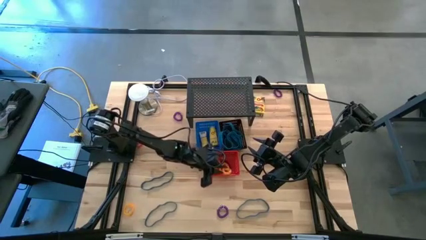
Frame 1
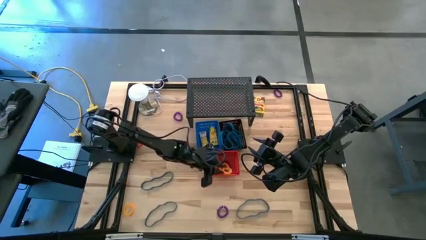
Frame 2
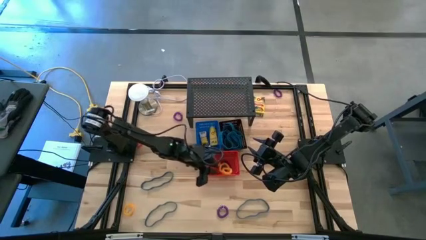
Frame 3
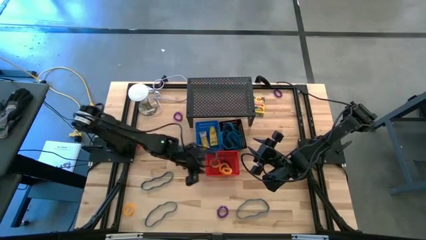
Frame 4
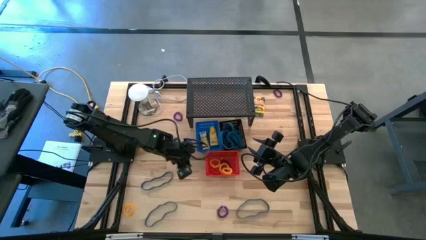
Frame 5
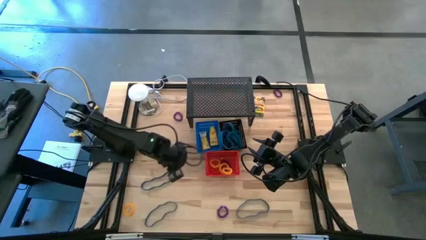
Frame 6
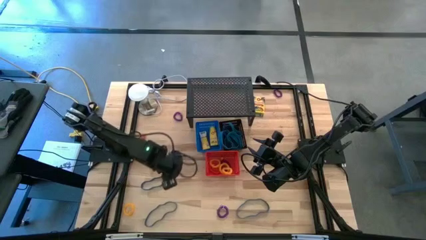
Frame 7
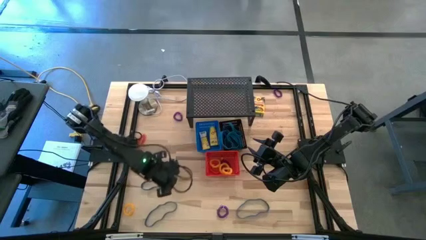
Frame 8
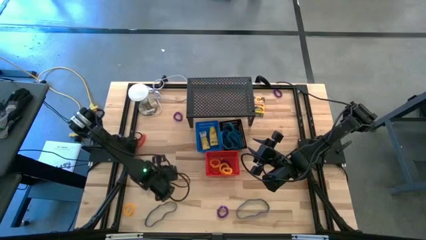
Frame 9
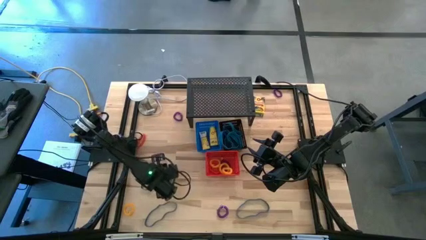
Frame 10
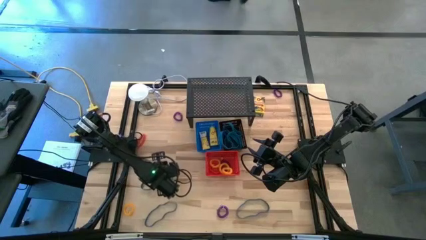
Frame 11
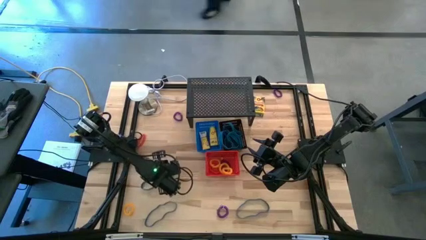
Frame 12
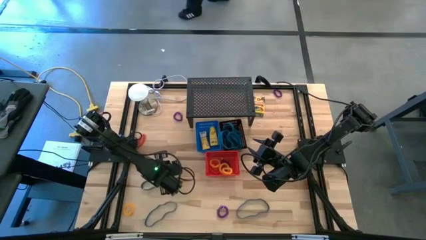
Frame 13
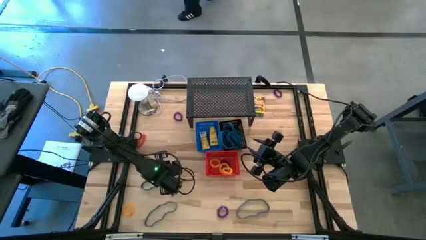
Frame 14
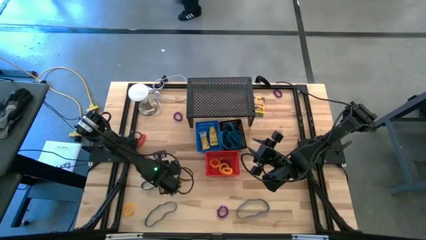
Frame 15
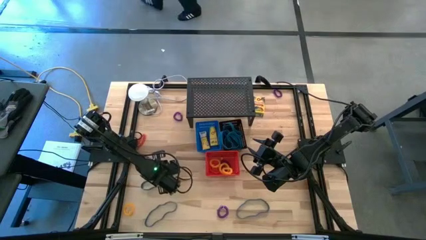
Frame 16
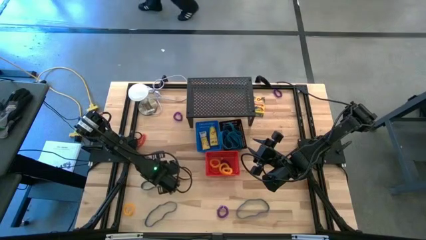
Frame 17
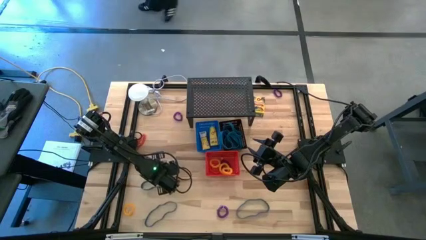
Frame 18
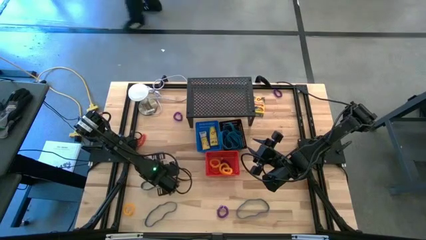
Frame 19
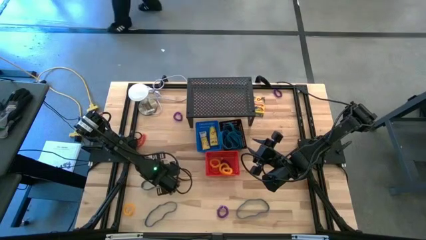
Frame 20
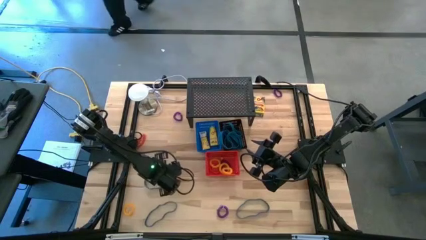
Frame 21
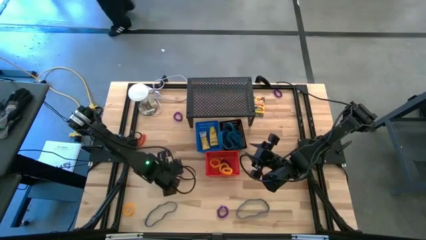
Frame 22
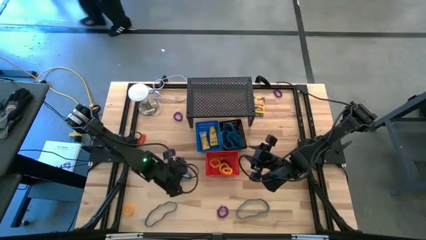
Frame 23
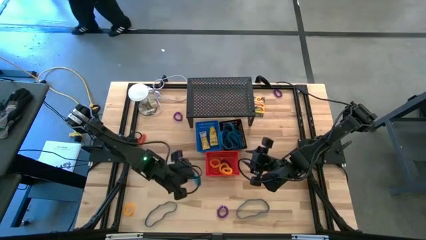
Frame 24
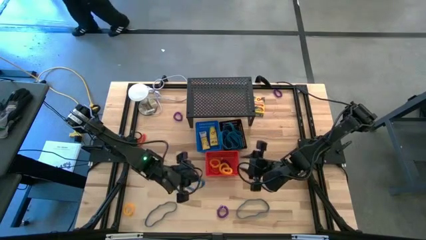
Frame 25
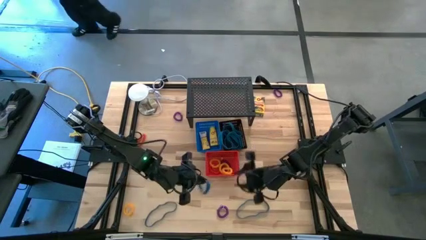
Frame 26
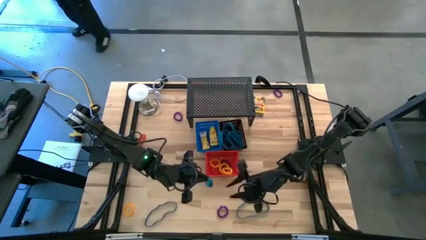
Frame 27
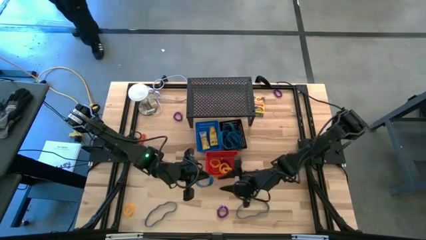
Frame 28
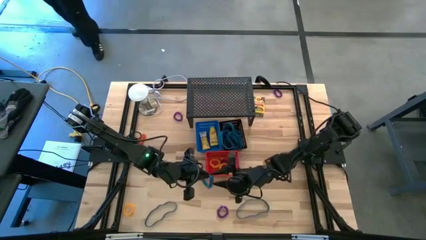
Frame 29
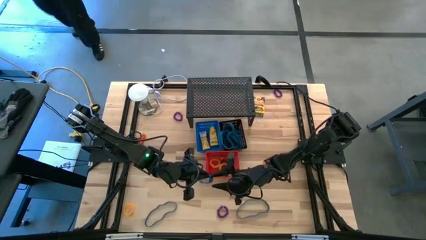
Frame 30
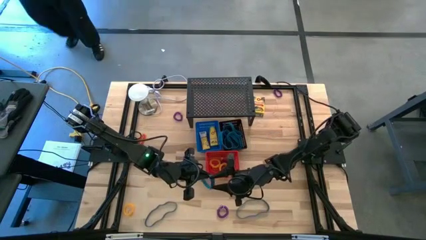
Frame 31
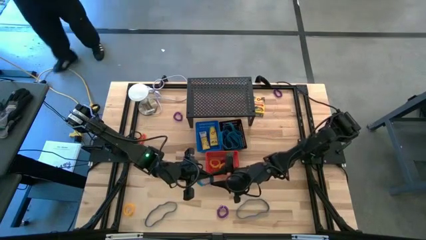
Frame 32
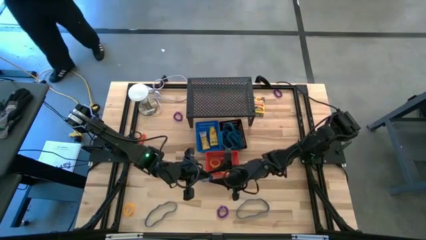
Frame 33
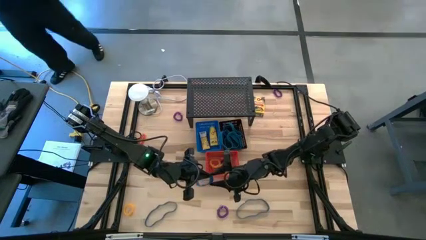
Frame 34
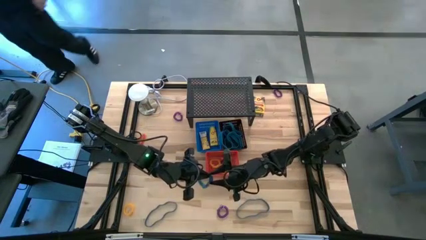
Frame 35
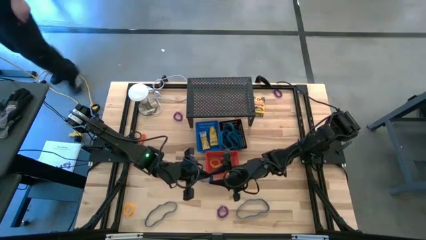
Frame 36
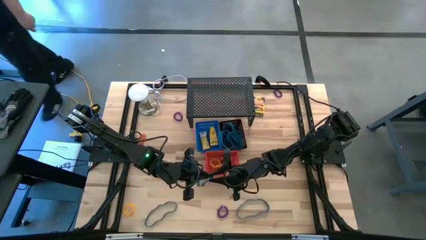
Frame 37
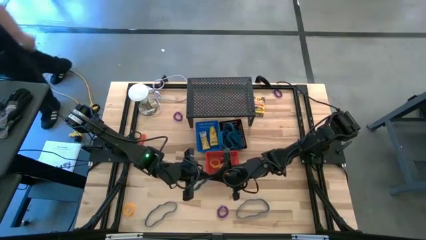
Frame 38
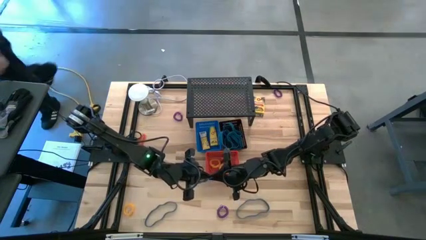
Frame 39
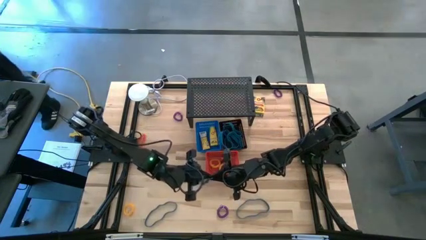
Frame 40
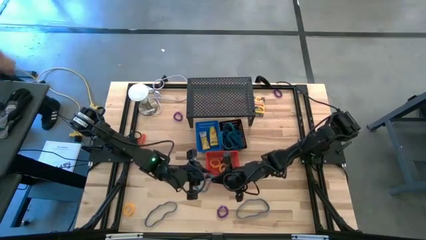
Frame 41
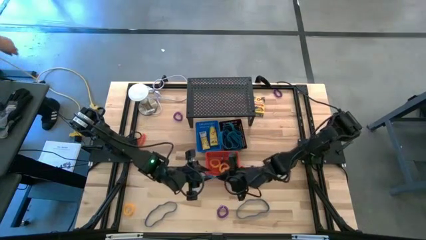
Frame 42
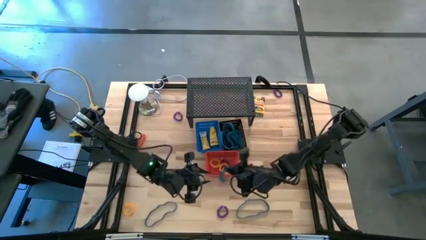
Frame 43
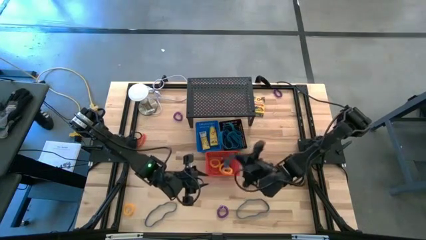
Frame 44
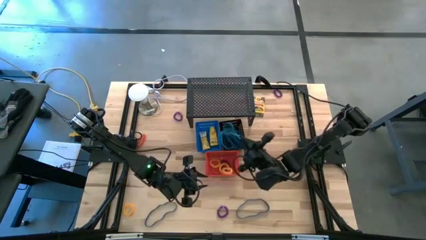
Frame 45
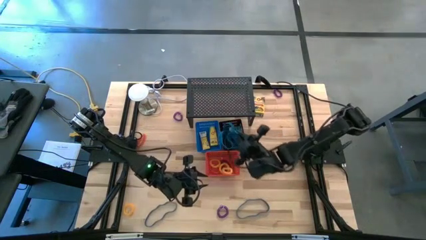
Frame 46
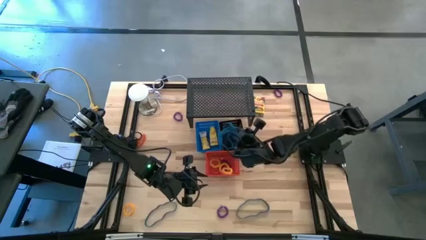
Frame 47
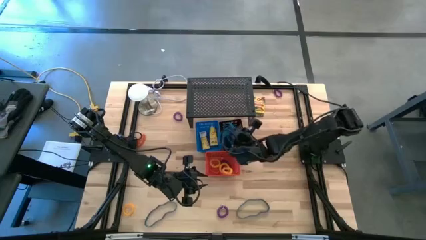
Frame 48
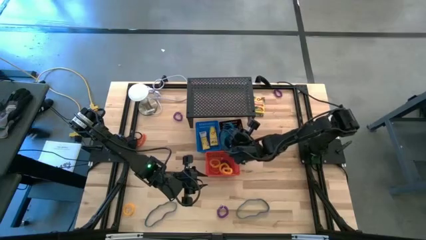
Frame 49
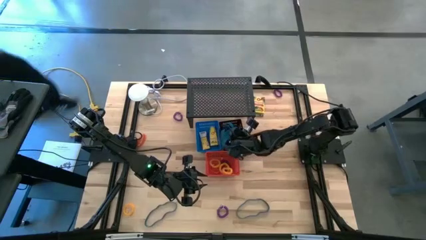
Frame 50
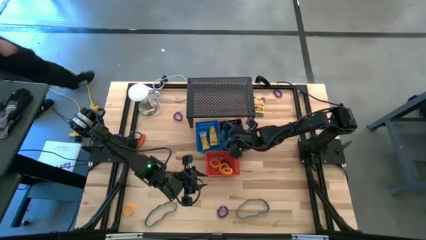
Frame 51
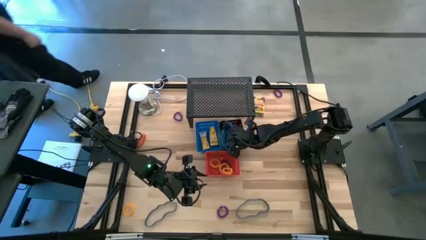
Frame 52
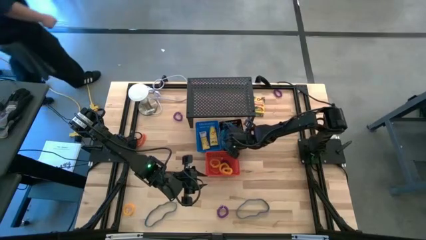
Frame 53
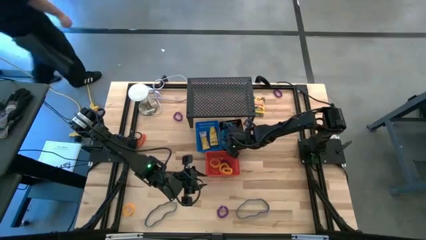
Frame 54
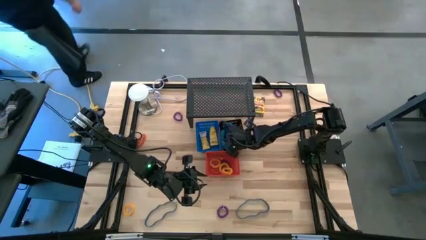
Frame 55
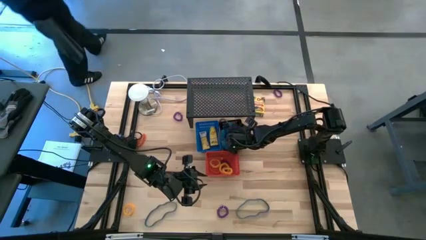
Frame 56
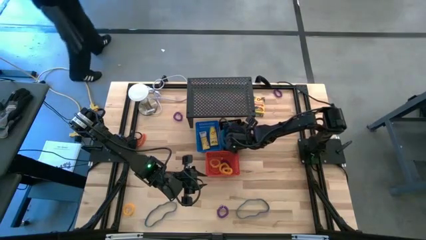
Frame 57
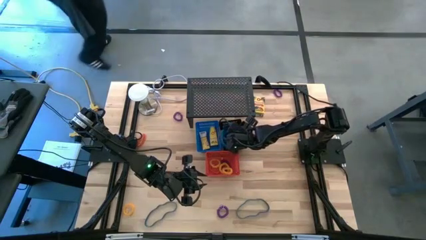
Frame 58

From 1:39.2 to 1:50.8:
Task: Pick & Place Office Desk Supplies
Put the blue rubber band into the black bin

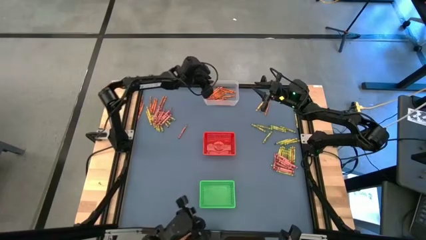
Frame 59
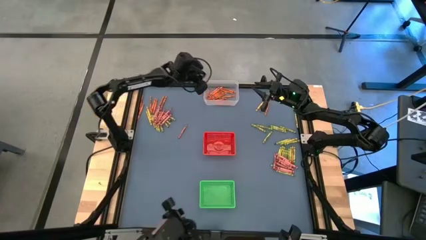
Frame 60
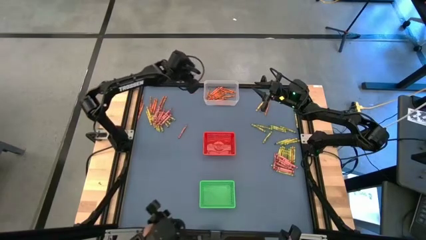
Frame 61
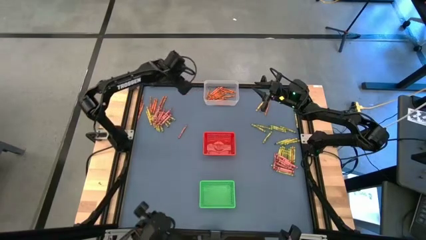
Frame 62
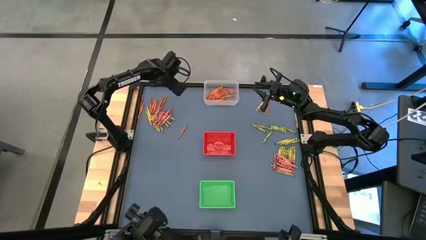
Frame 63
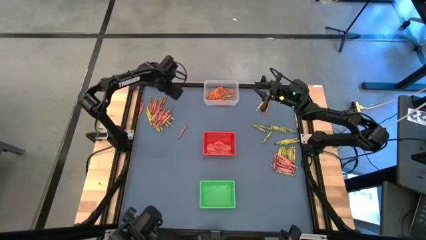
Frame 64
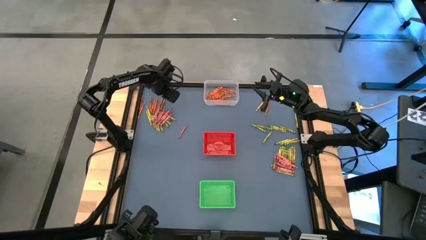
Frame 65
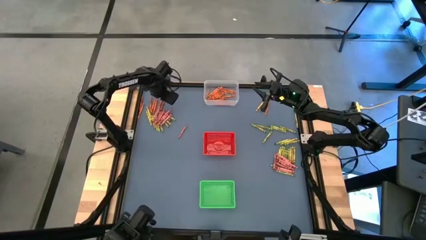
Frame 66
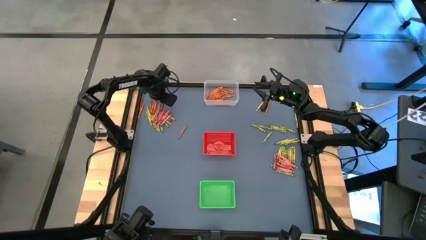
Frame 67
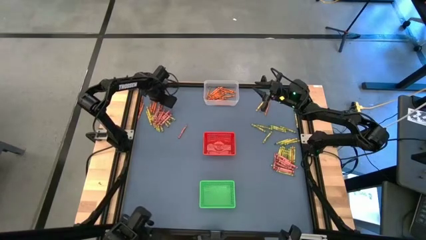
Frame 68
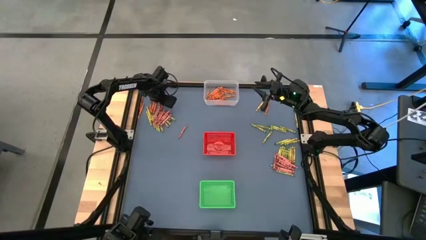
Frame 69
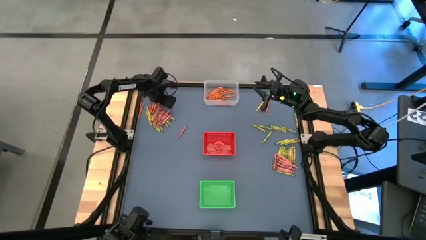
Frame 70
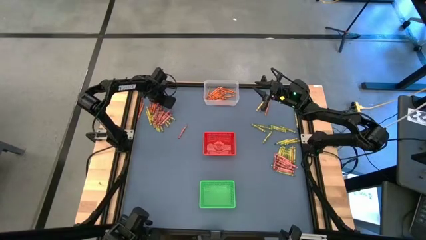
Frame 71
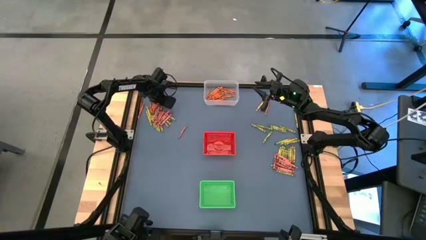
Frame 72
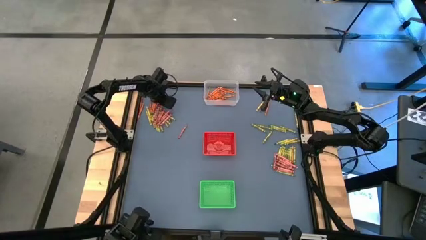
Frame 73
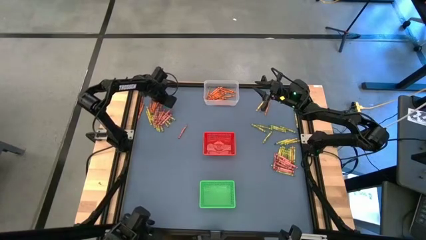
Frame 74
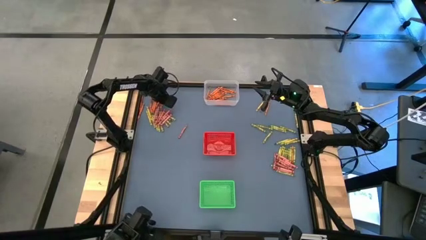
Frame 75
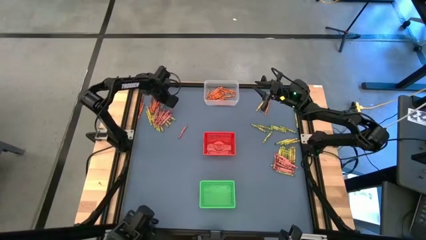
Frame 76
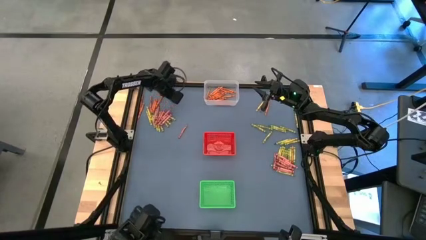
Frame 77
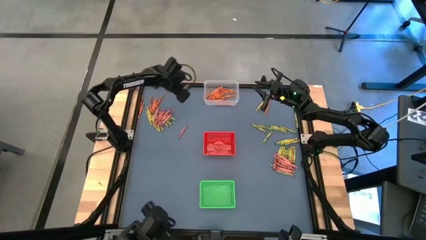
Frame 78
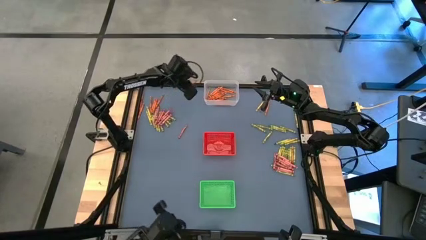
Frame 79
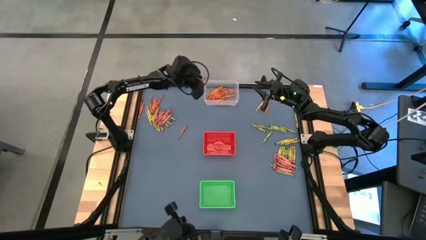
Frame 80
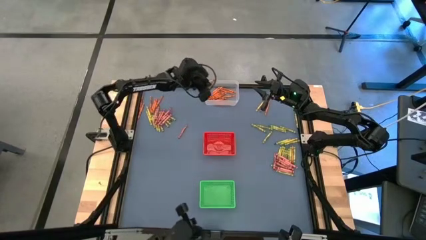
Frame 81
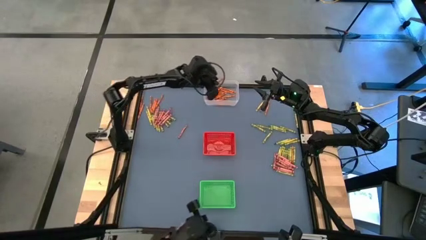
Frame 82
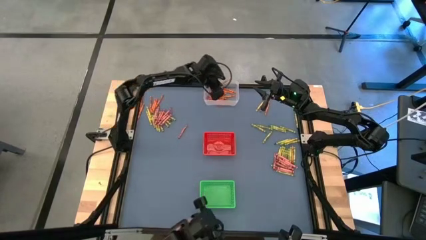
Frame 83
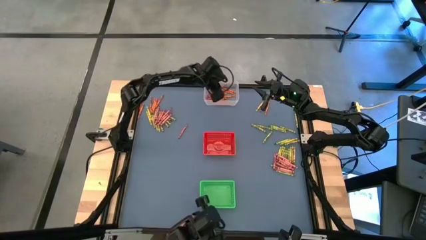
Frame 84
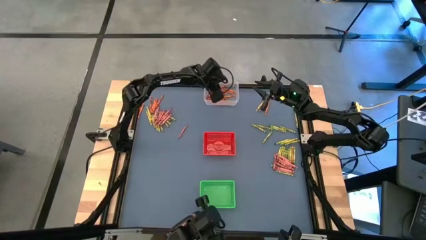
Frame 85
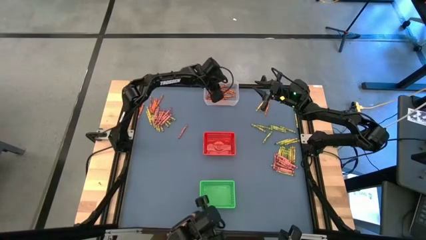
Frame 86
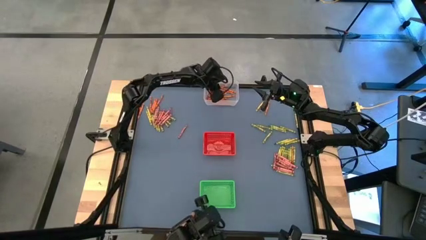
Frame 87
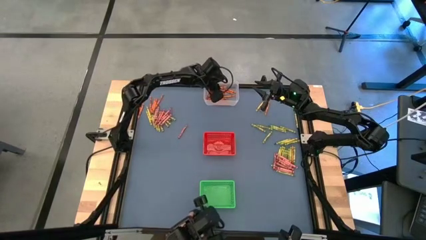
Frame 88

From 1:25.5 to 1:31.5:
Task: Sort crayons
Put the orange crayon into the transparent bin
